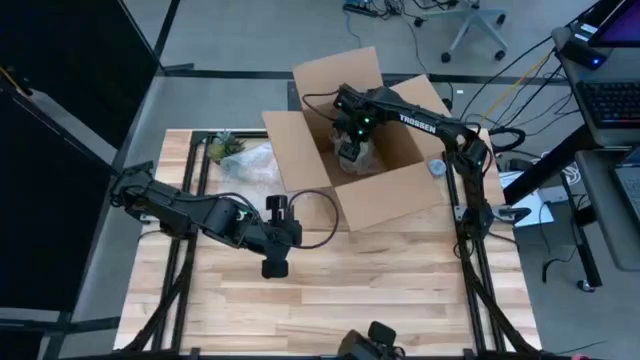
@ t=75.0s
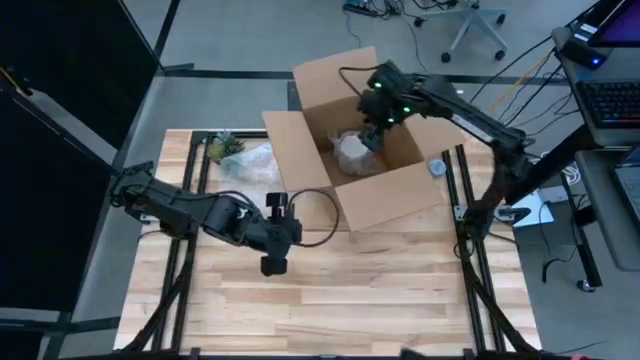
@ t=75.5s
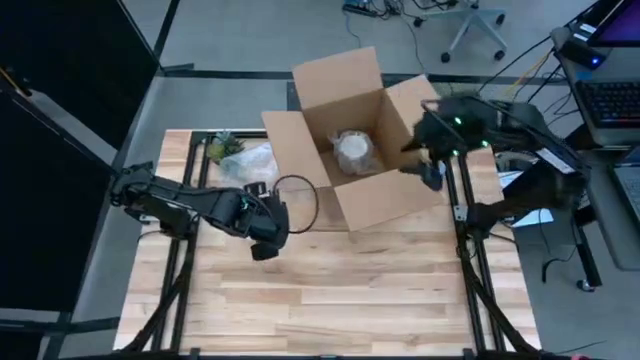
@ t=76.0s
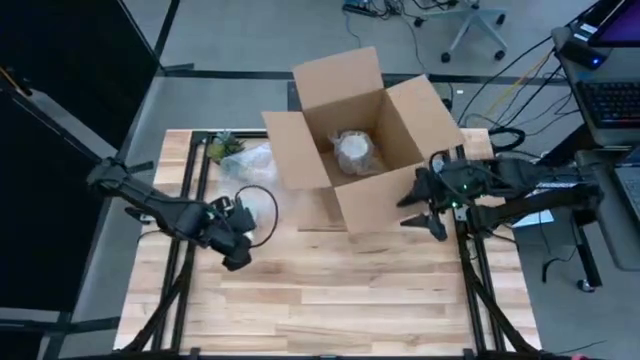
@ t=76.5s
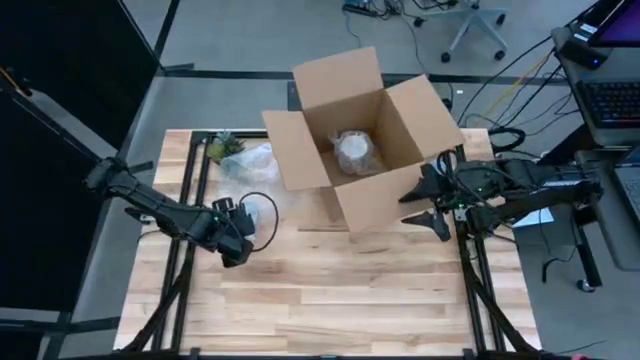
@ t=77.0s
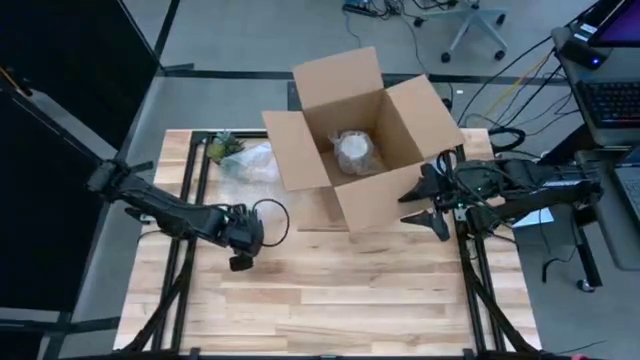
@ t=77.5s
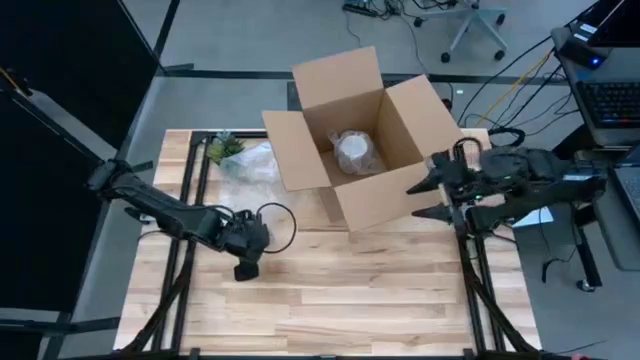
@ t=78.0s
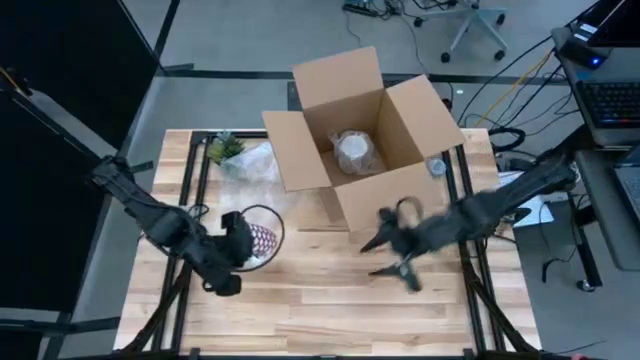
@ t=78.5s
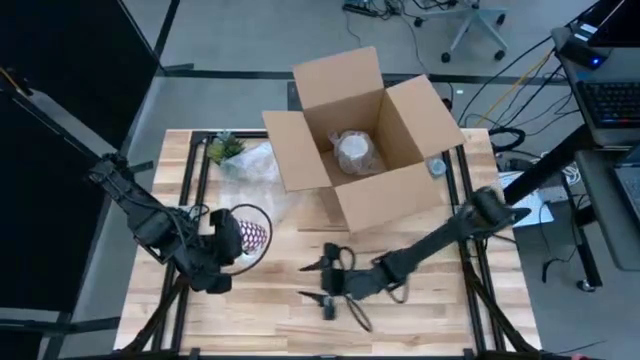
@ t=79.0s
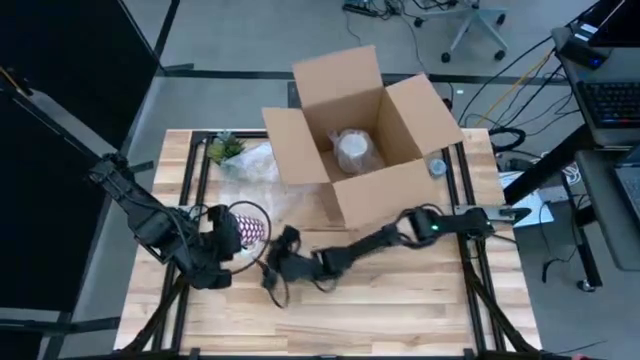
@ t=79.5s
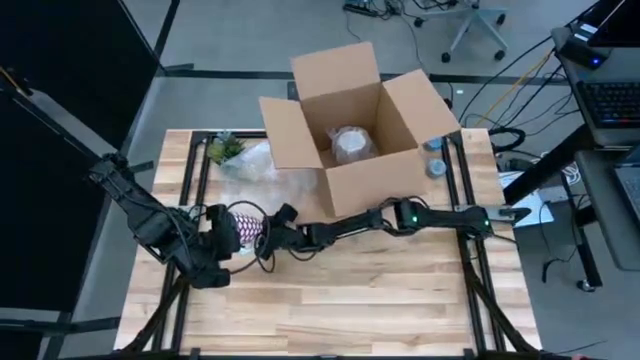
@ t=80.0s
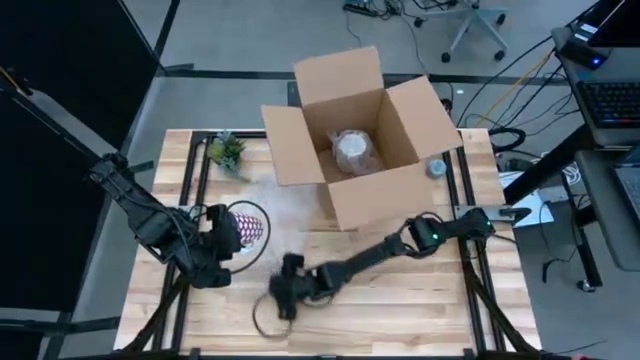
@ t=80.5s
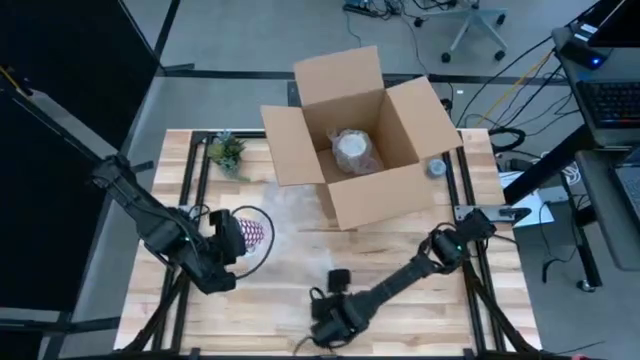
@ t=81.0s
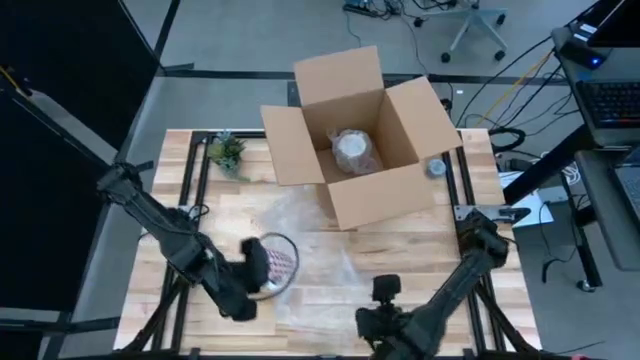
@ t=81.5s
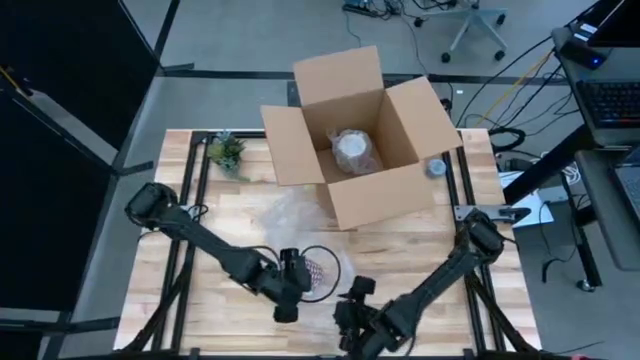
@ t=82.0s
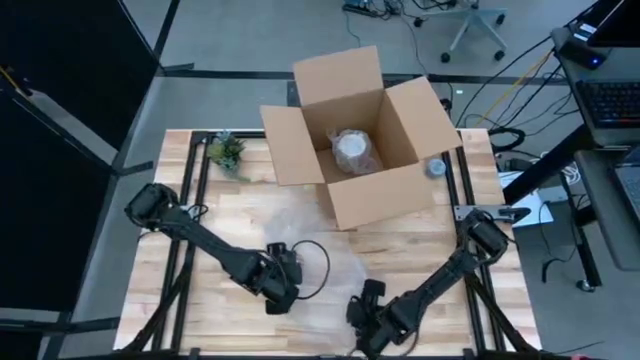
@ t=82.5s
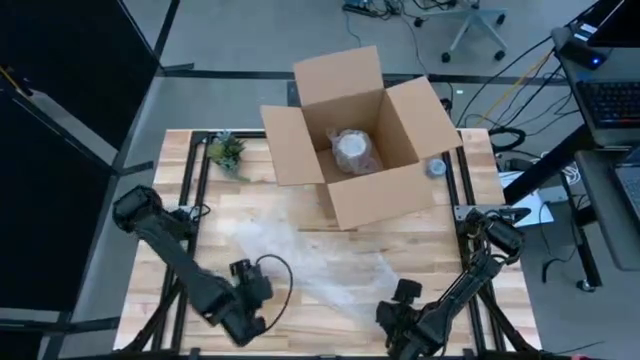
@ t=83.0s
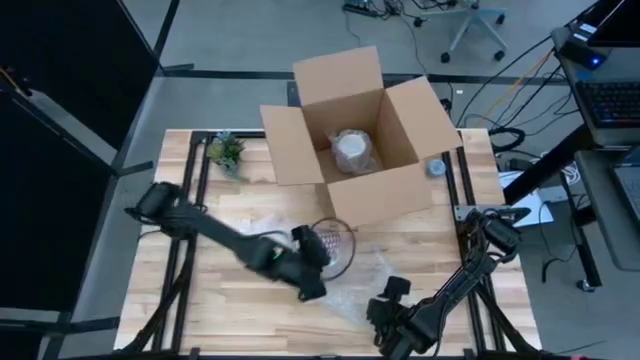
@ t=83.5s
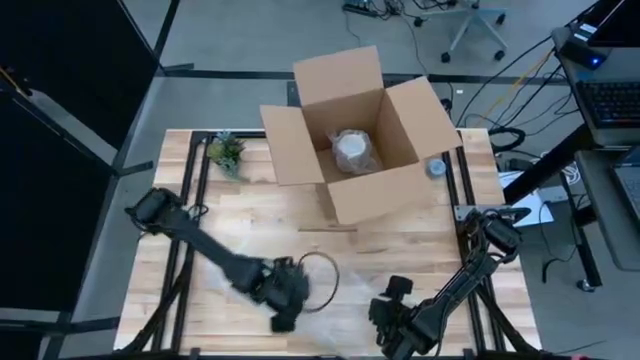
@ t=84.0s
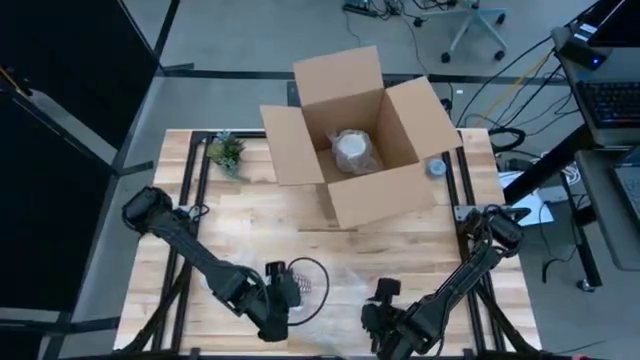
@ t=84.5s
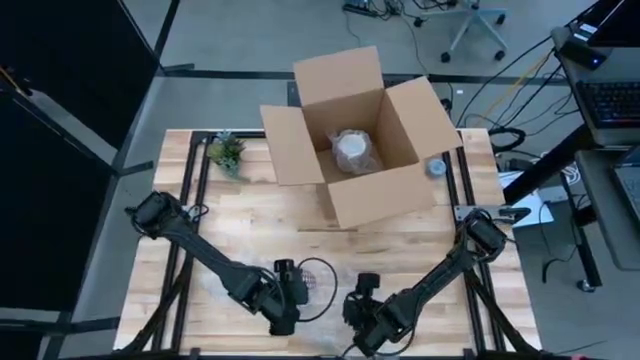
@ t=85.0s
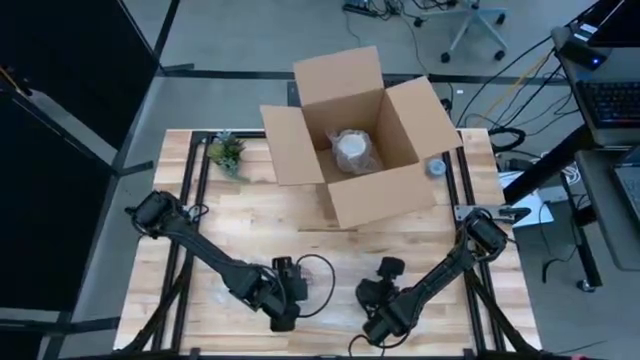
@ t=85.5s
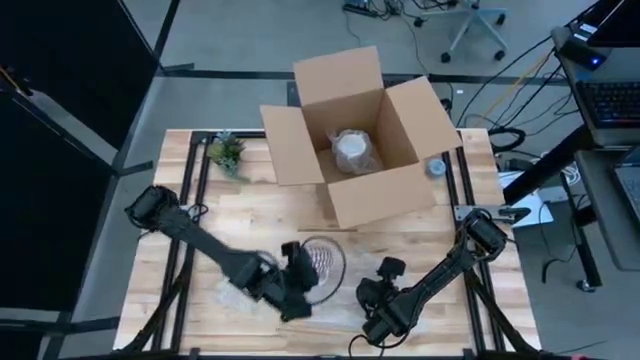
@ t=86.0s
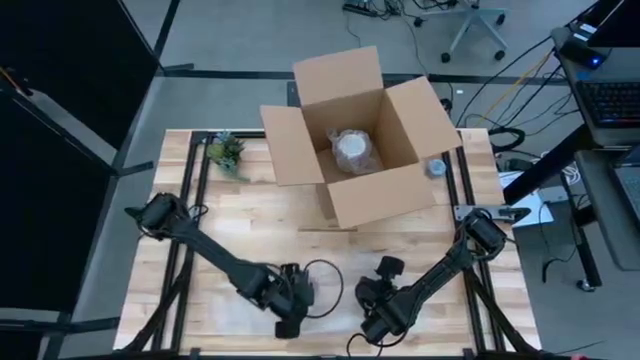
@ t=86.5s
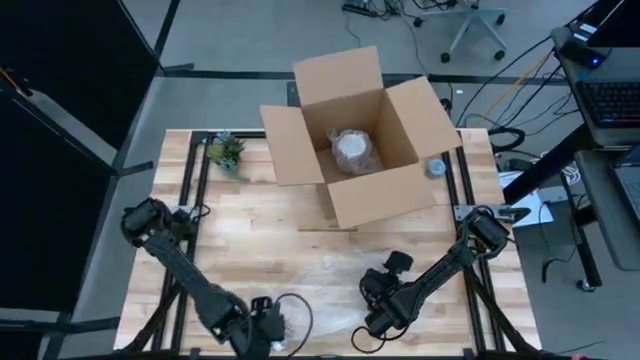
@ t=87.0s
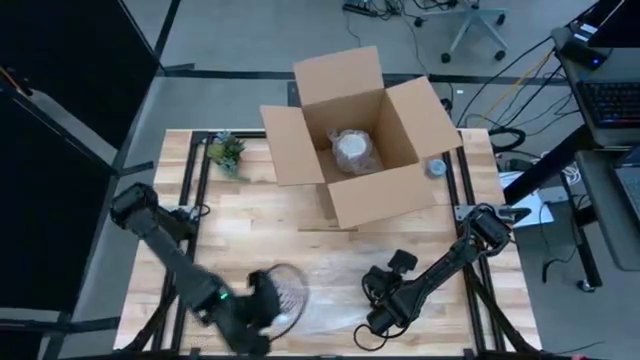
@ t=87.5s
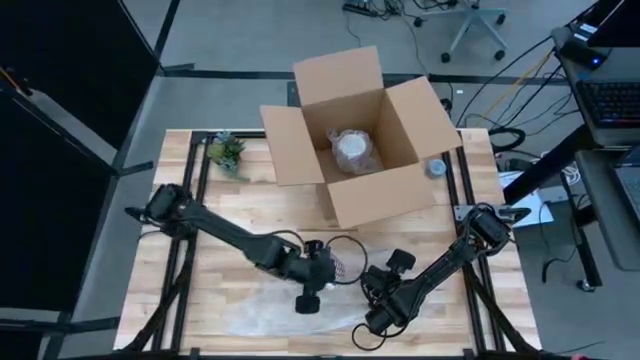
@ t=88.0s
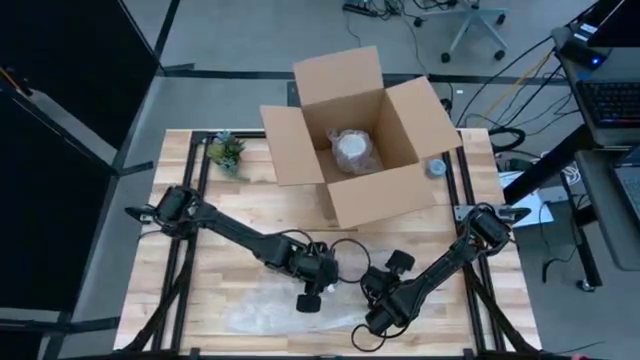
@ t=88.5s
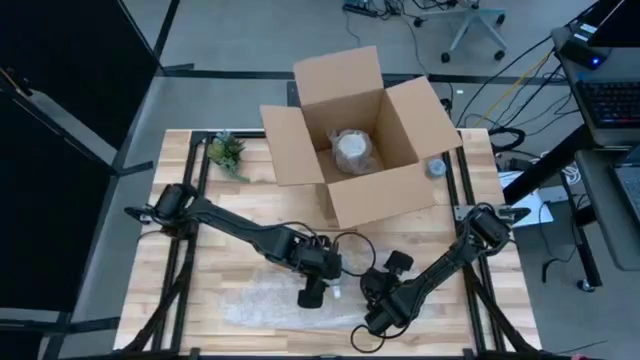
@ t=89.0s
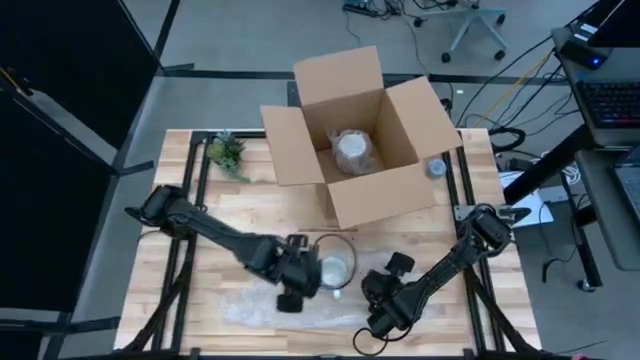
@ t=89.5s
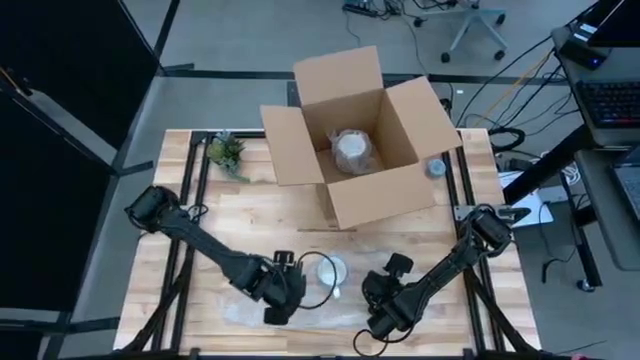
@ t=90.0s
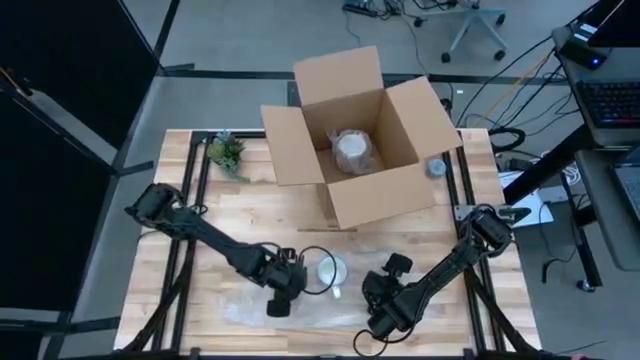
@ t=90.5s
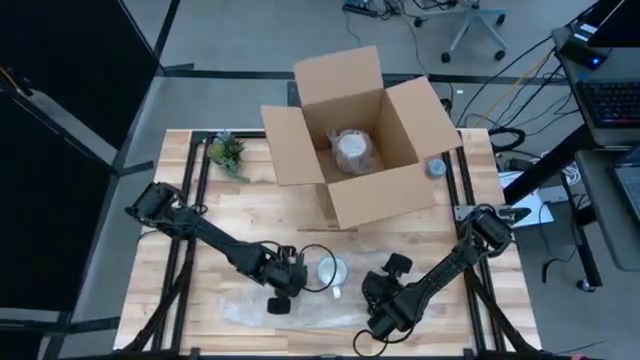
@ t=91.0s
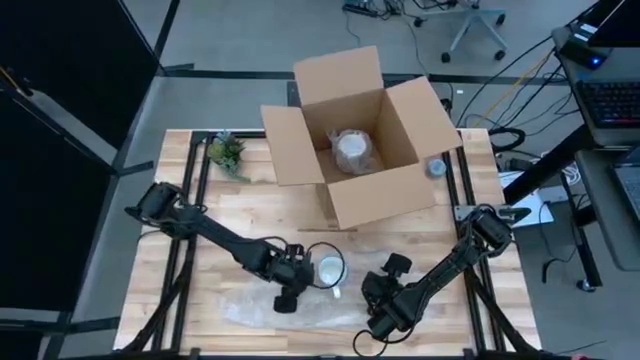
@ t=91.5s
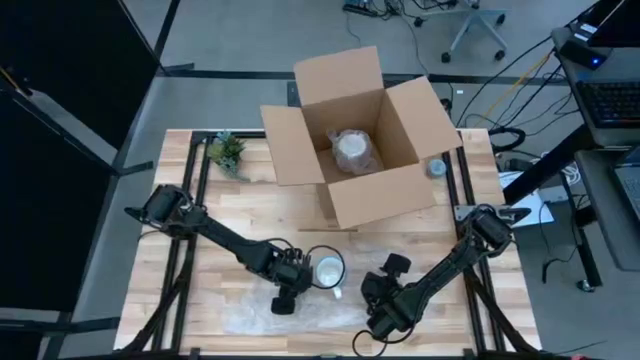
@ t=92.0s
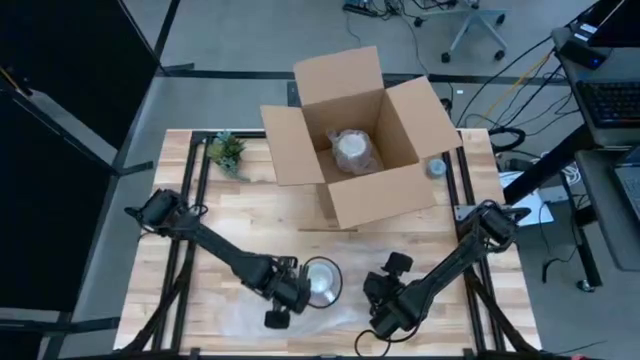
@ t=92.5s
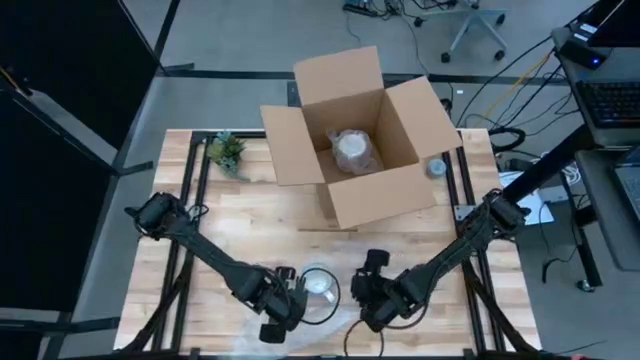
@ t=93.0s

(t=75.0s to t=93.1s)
Task: wrap mug
Wrap the red mug with the bubble wrap

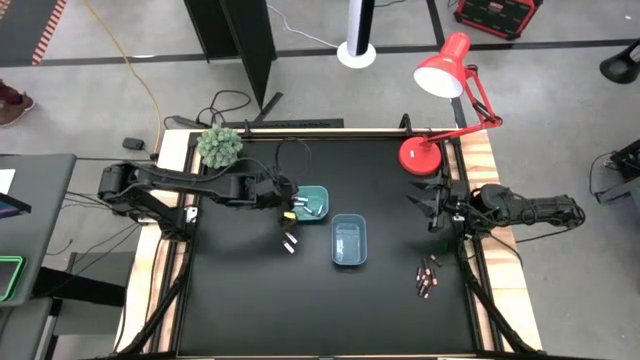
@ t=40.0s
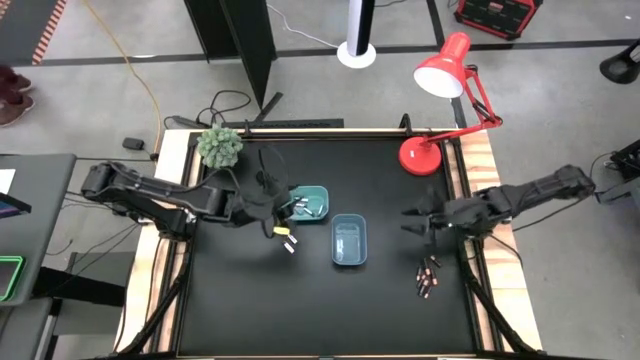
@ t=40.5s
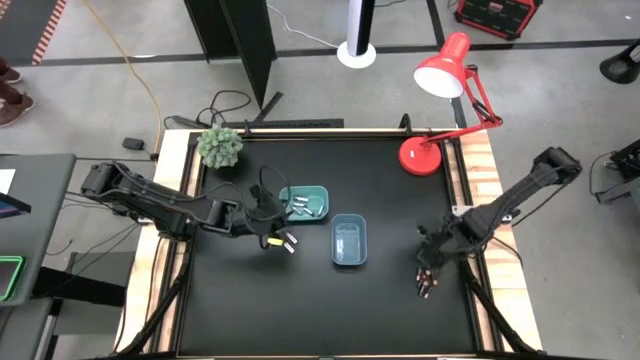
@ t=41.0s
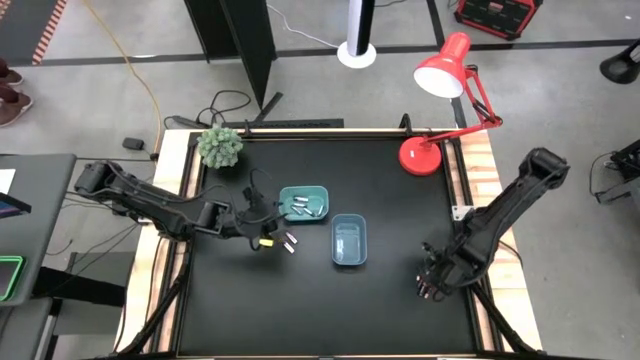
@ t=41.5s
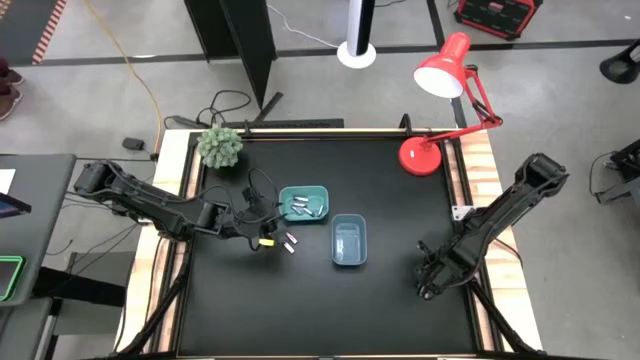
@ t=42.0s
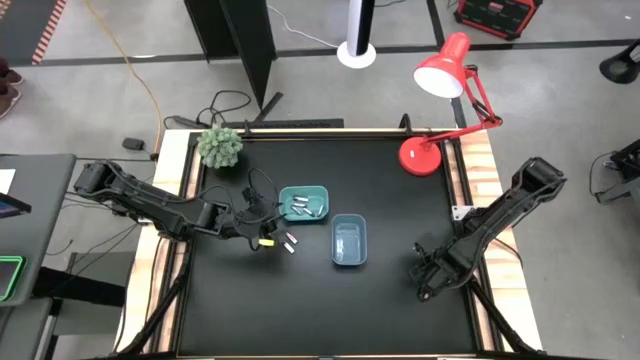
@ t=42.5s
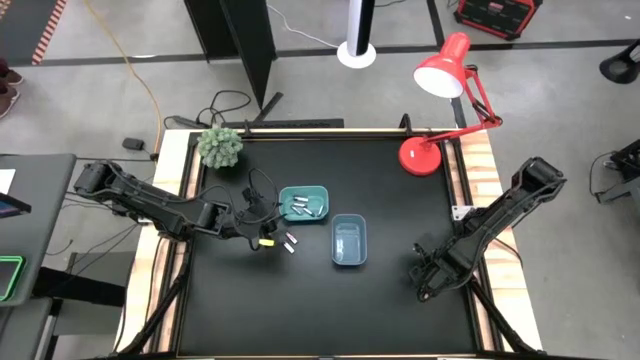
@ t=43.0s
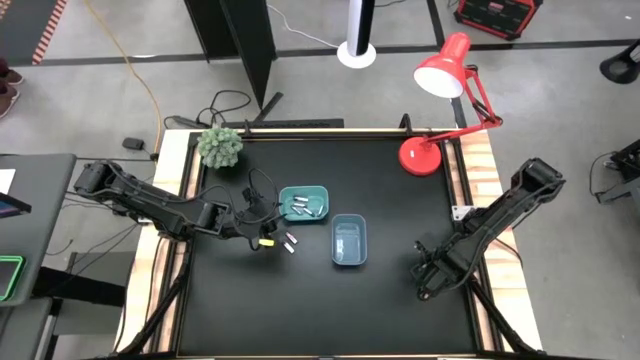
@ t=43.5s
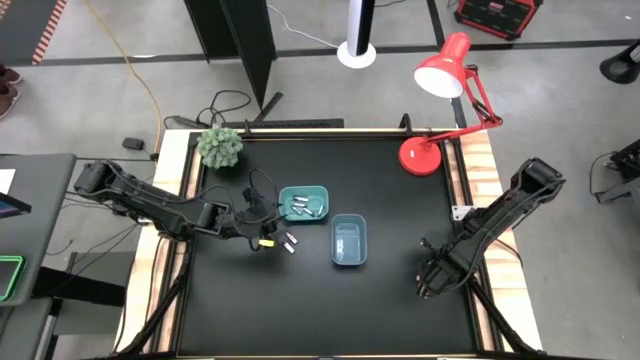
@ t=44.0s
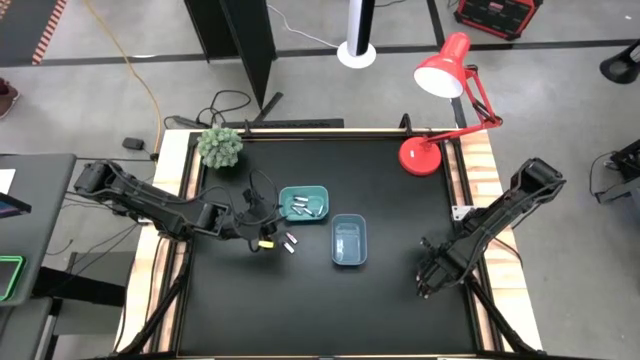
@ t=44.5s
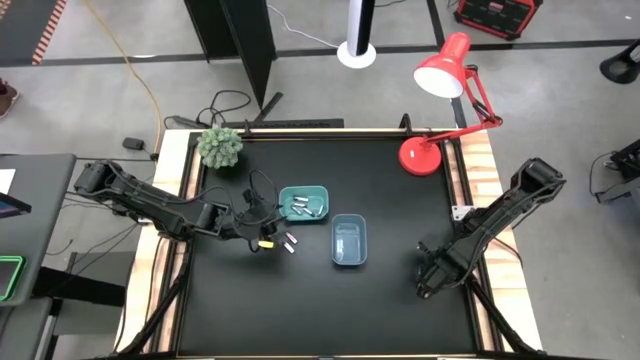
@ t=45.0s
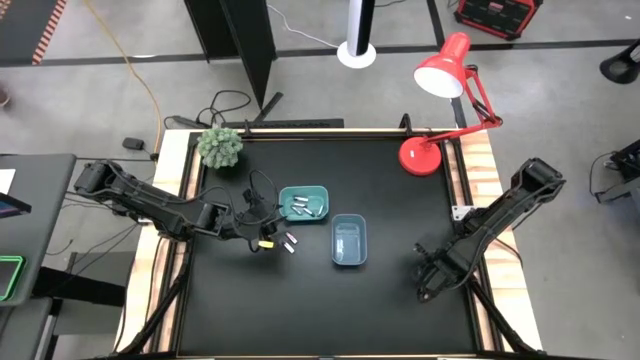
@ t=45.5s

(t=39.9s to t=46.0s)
Task: Sort batteries
Put the black battery into the dark blue bin
